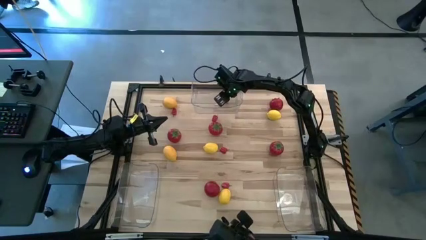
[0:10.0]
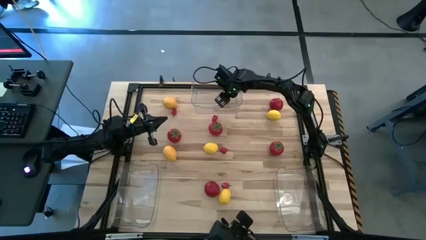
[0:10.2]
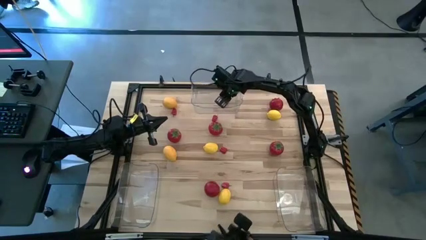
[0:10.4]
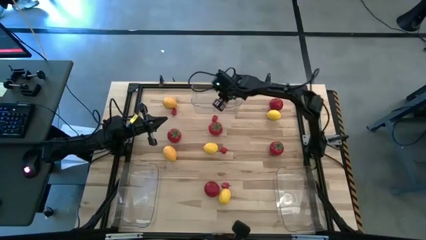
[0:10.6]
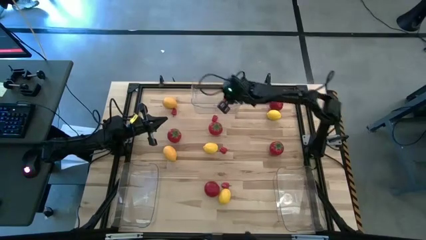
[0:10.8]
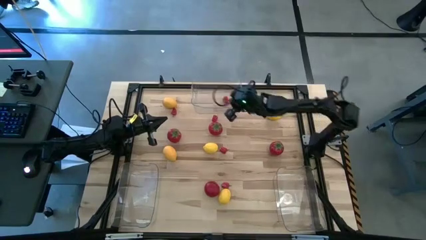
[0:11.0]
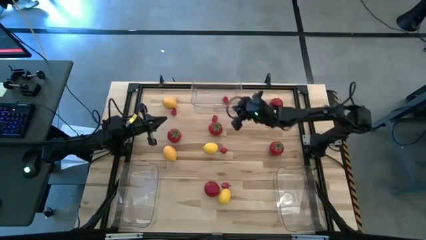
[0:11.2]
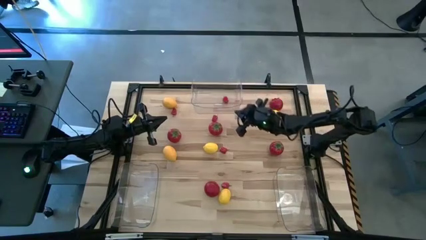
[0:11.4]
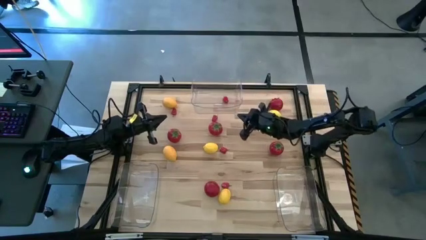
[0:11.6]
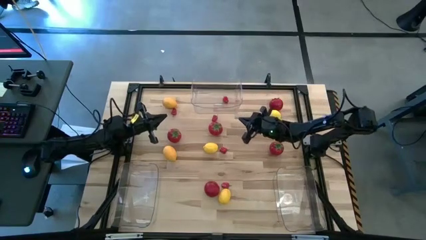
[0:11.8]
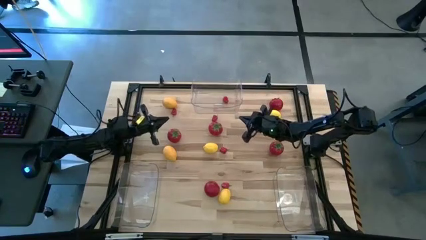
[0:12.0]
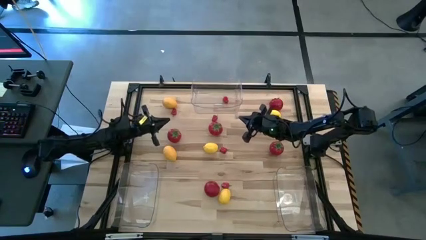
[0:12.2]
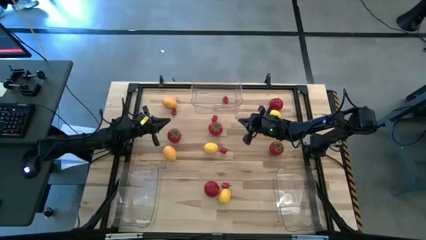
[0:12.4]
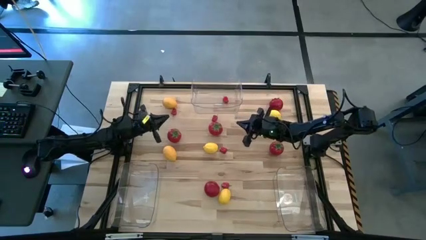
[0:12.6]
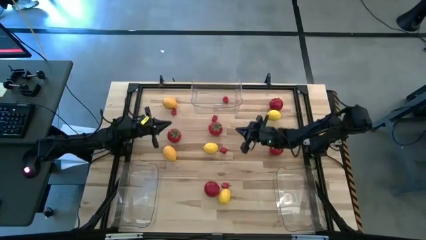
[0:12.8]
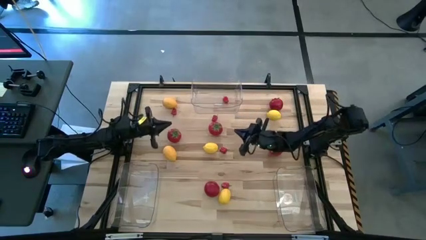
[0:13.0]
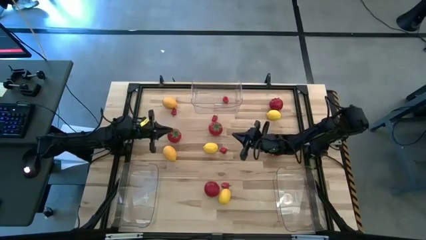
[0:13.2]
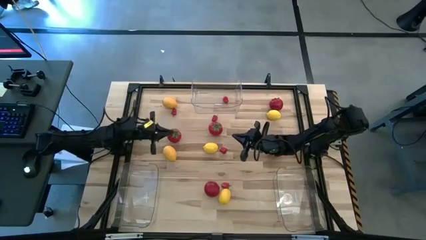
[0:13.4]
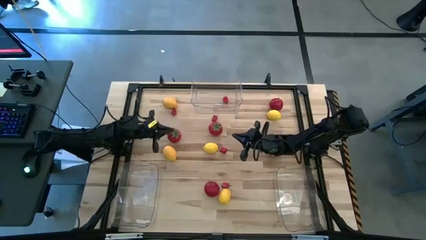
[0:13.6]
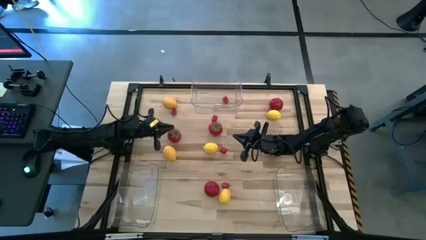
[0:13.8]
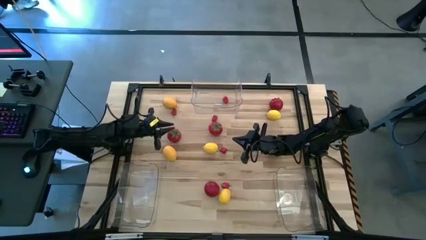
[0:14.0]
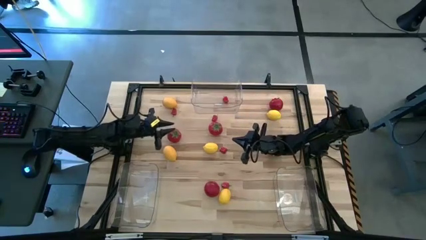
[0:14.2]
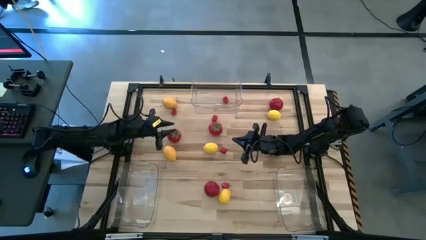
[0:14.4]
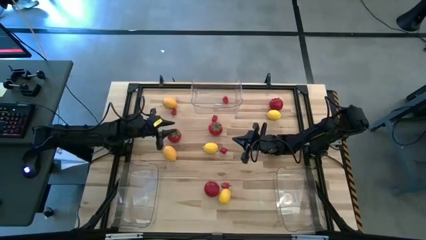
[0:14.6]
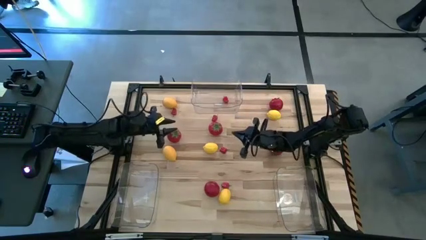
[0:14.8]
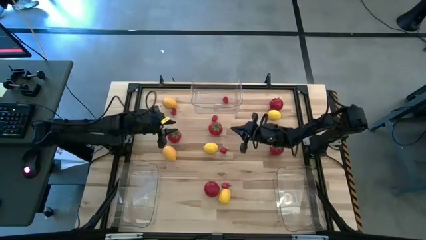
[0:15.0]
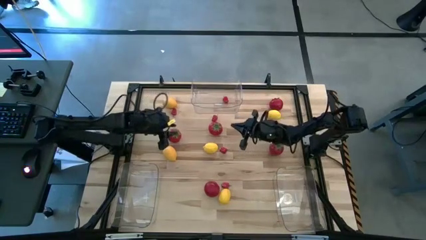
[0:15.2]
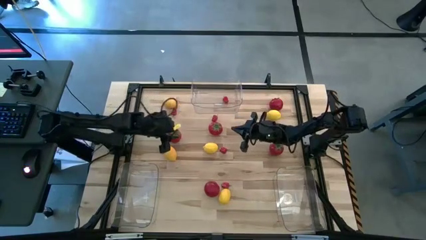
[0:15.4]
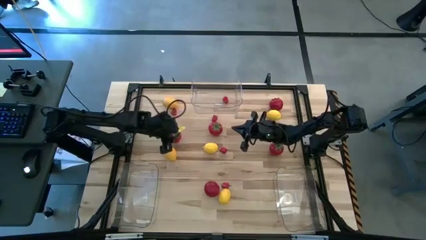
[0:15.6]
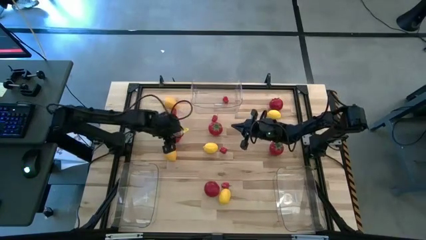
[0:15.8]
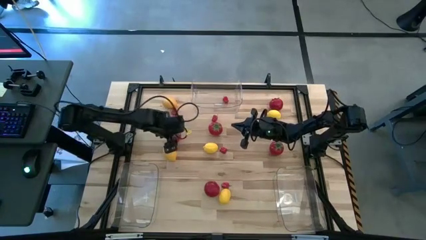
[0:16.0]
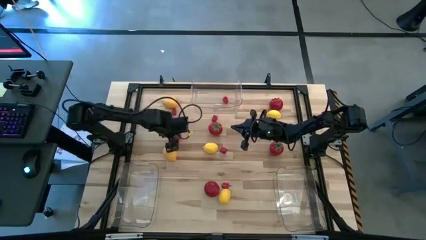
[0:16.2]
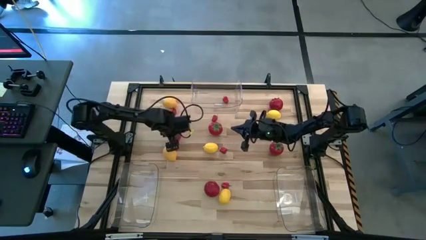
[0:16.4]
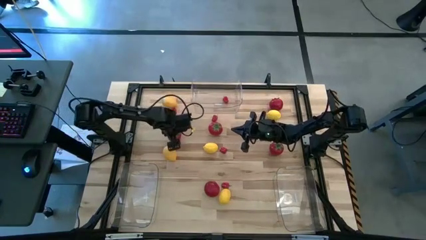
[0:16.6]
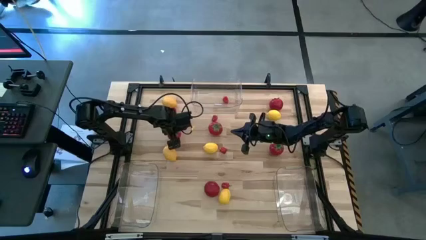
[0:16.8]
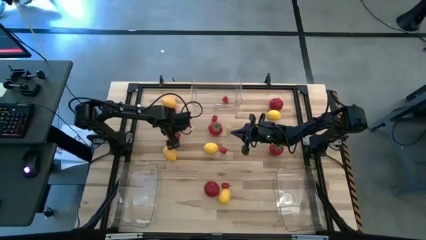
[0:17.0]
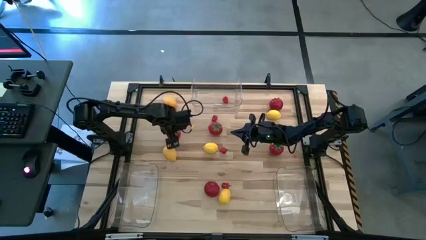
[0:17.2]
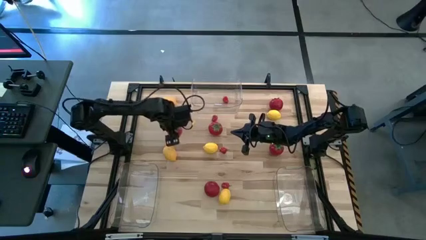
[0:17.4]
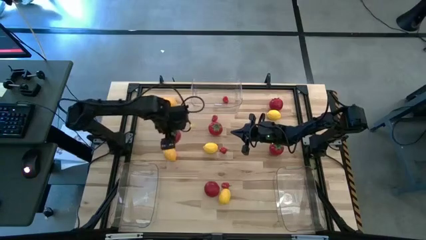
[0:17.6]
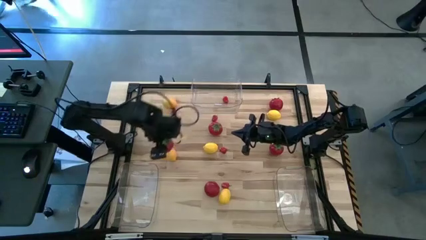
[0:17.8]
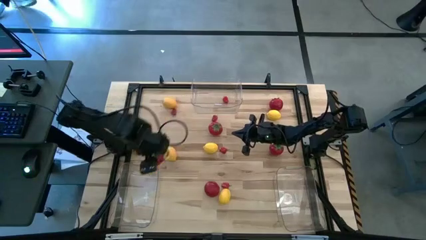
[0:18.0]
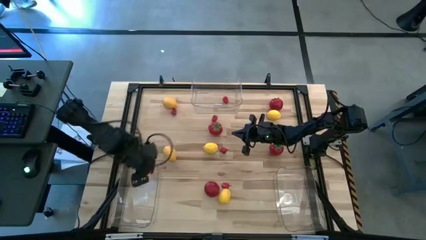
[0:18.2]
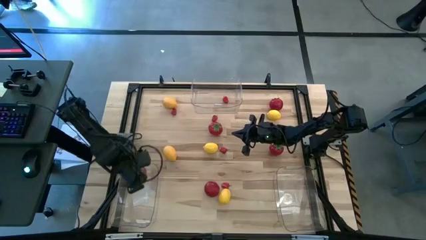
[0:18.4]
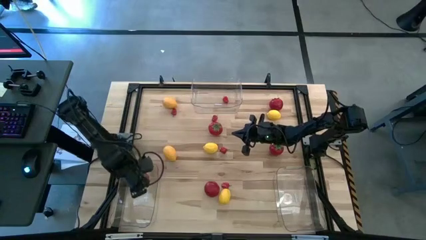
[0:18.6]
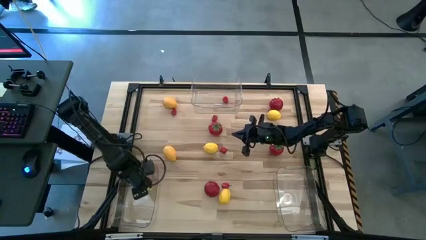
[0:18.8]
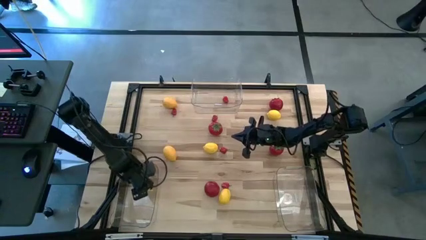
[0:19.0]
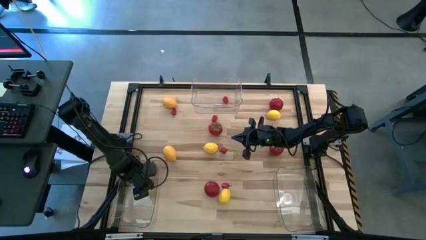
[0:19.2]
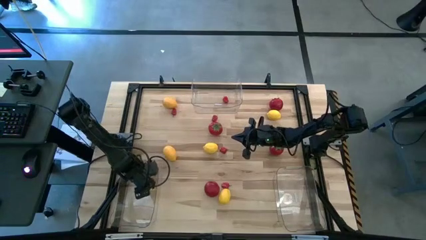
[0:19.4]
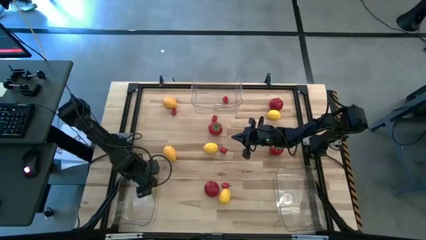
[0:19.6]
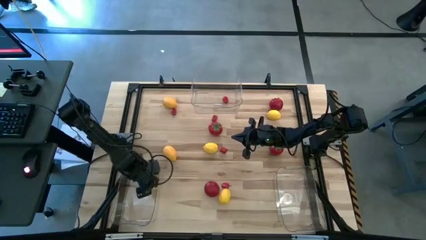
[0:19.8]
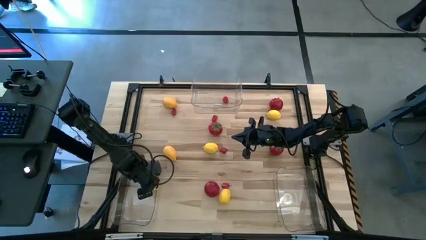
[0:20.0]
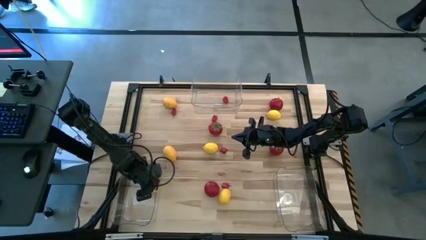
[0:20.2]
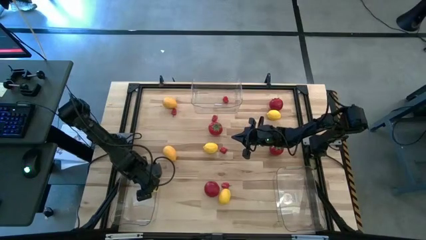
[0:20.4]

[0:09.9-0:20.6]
Task: Sort produce into baskets
Put the red tomato into the bottom left transparent bin

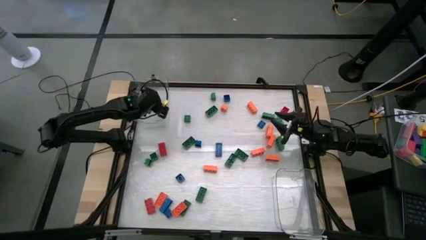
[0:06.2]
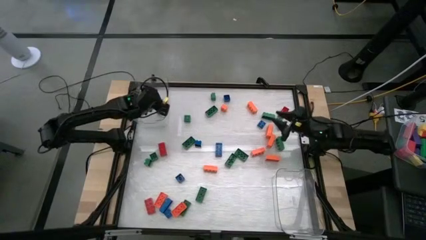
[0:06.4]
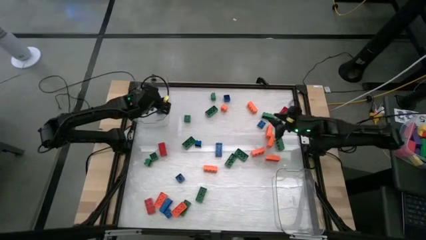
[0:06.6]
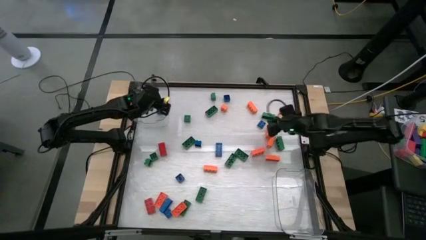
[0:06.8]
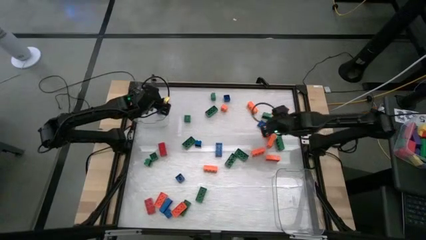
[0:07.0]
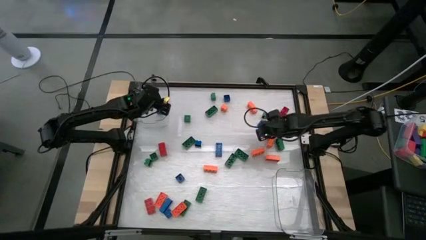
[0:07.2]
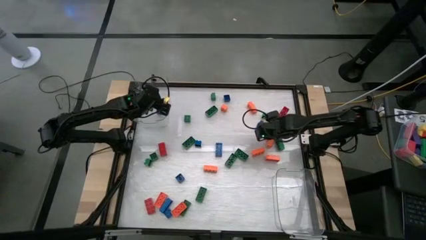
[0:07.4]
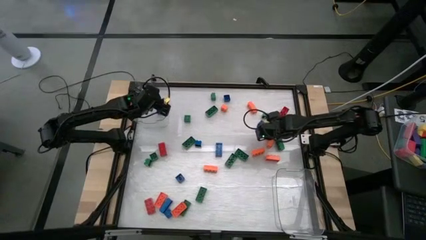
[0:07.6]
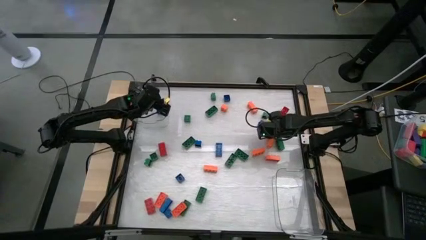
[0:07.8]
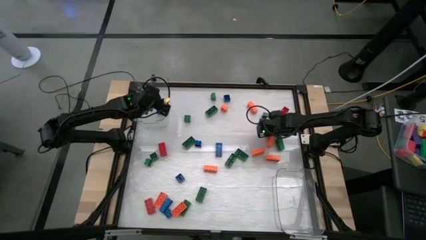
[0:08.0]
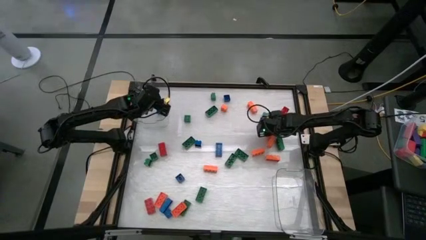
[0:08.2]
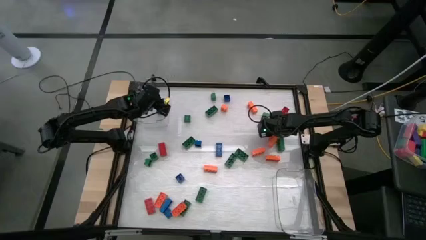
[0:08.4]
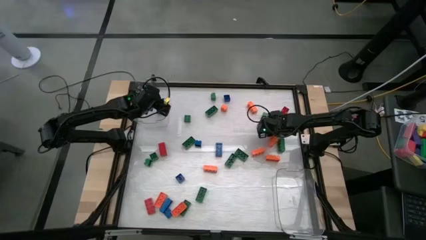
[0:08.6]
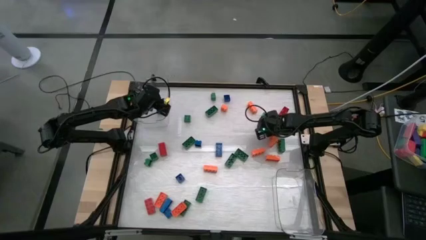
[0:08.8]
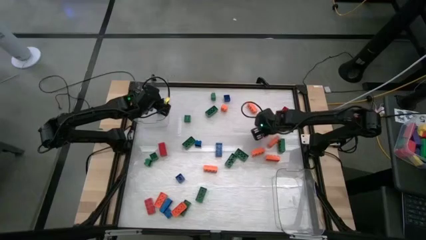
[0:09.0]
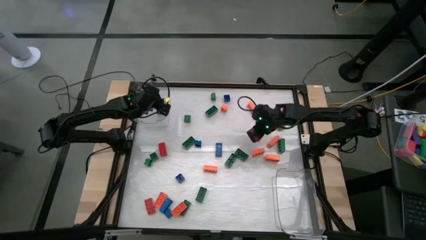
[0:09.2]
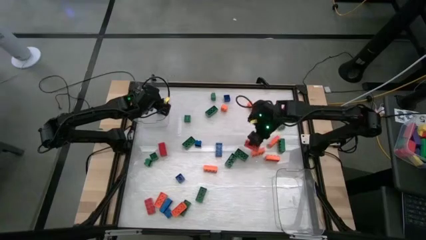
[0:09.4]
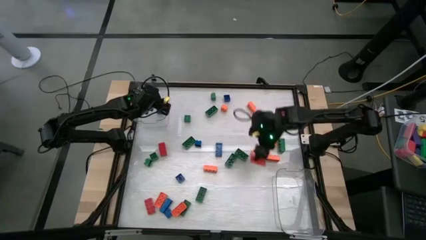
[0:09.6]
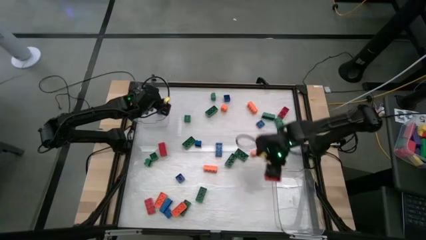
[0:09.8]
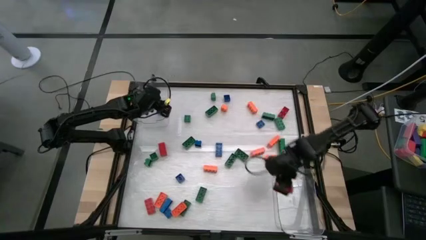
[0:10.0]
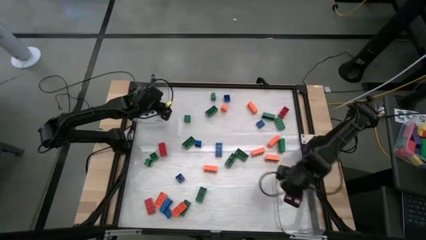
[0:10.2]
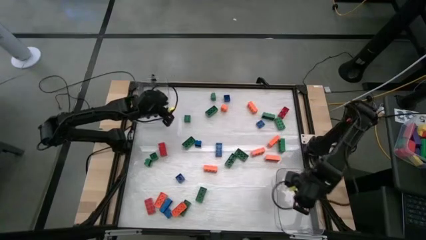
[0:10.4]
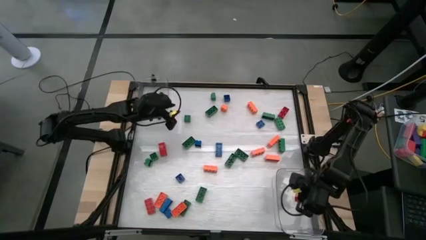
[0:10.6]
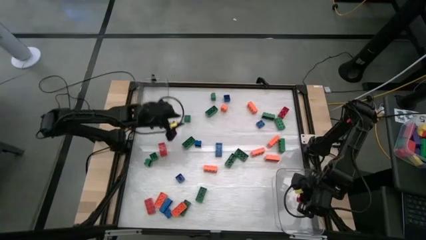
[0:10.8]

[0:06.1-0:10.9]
Task: Sort blocks by size
Put the 8 stud orange game piece into the bottom transparent bin
